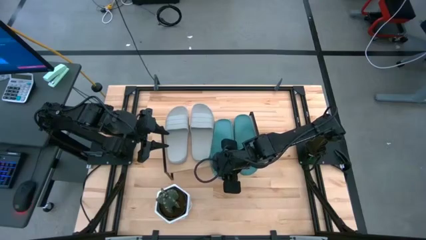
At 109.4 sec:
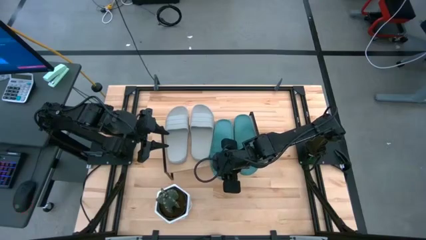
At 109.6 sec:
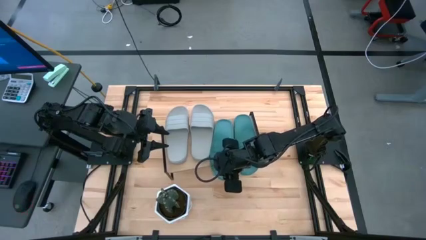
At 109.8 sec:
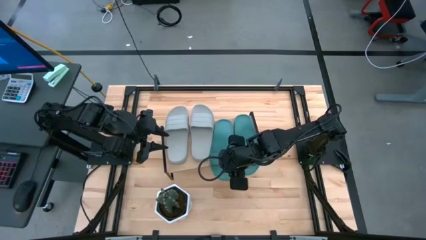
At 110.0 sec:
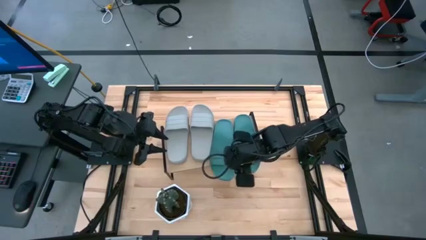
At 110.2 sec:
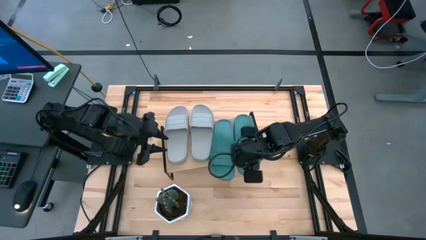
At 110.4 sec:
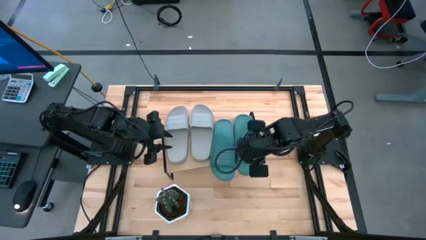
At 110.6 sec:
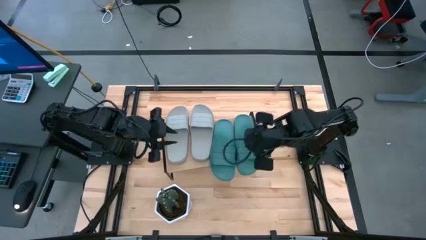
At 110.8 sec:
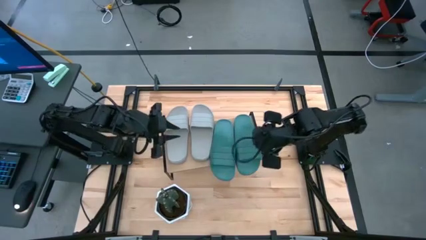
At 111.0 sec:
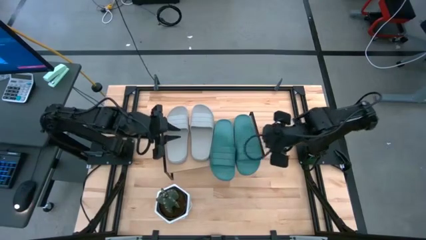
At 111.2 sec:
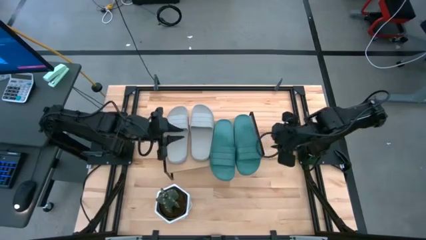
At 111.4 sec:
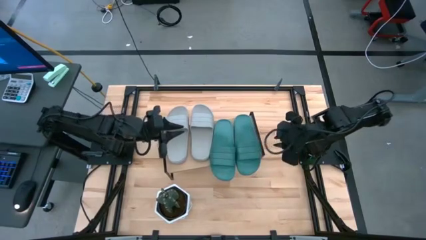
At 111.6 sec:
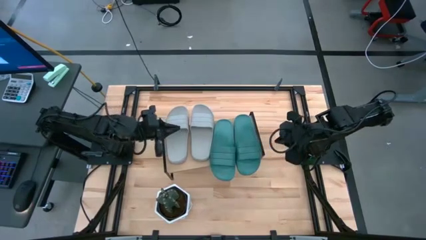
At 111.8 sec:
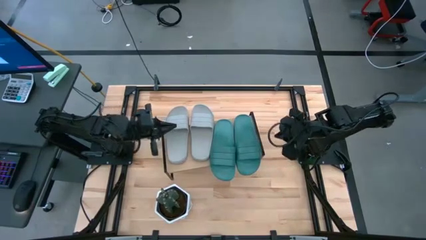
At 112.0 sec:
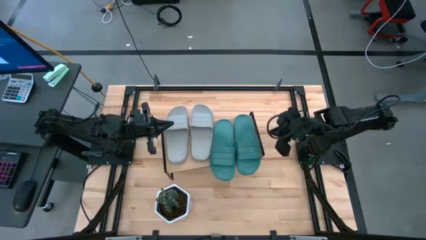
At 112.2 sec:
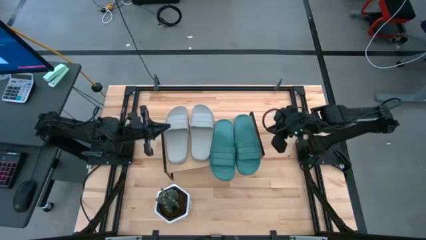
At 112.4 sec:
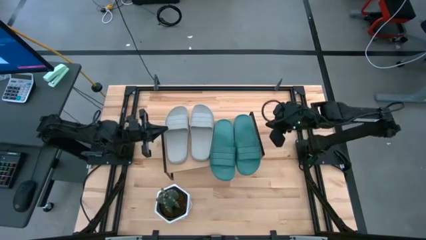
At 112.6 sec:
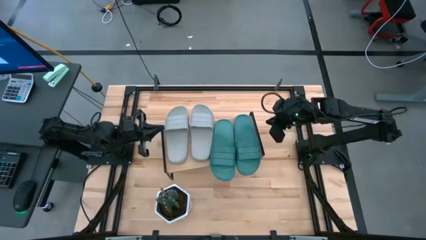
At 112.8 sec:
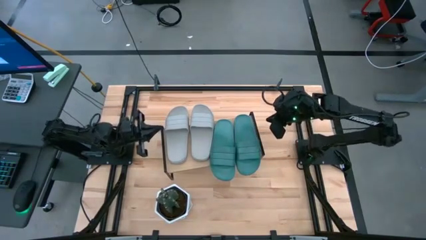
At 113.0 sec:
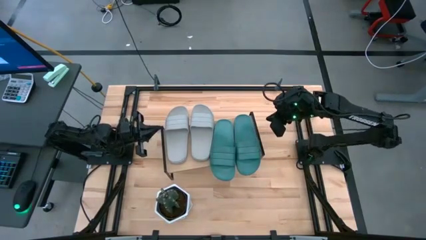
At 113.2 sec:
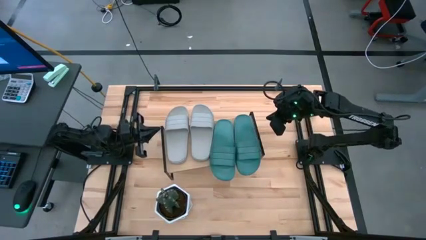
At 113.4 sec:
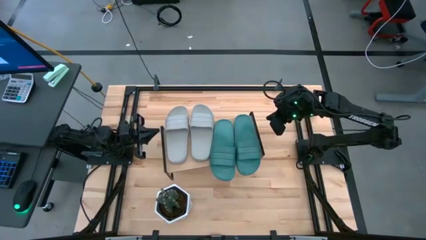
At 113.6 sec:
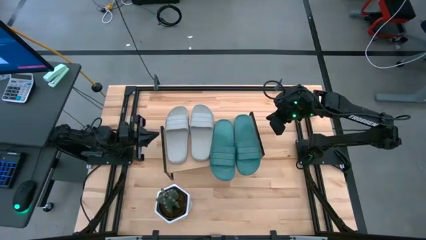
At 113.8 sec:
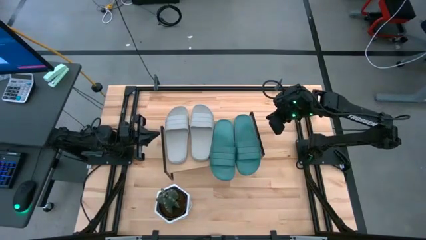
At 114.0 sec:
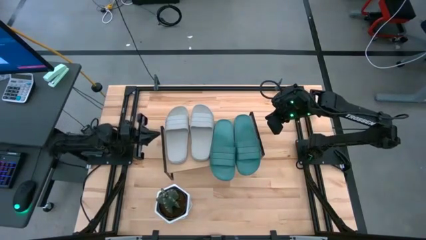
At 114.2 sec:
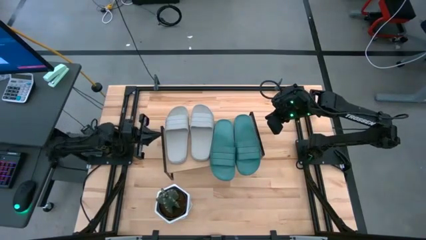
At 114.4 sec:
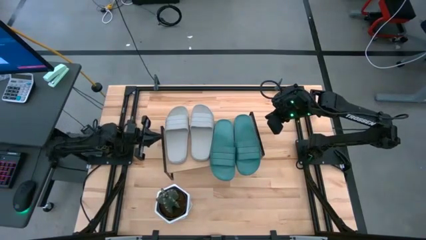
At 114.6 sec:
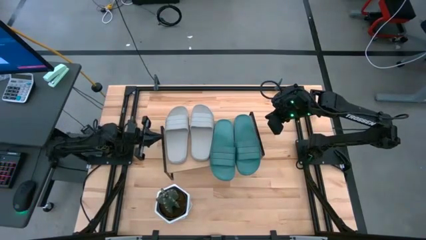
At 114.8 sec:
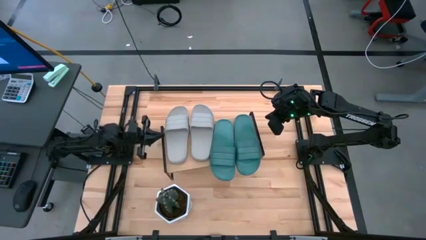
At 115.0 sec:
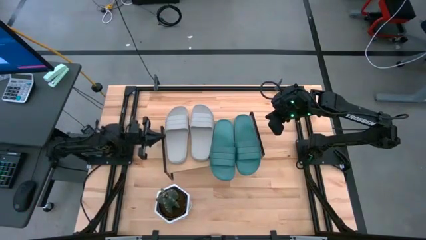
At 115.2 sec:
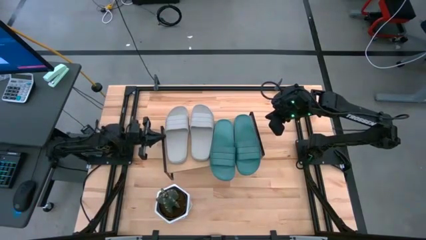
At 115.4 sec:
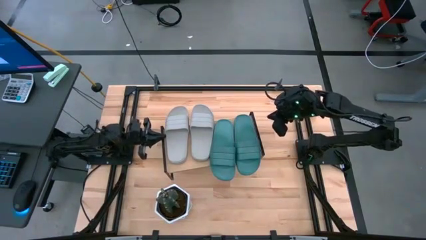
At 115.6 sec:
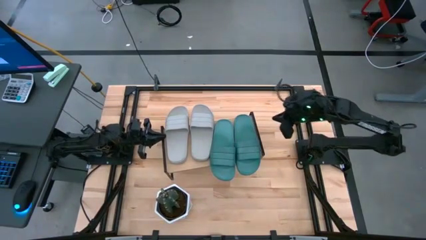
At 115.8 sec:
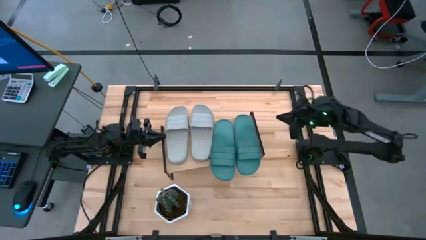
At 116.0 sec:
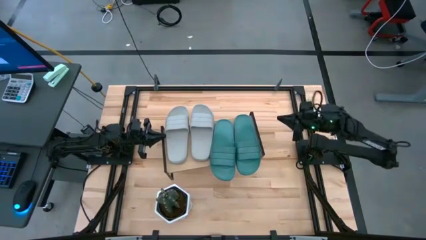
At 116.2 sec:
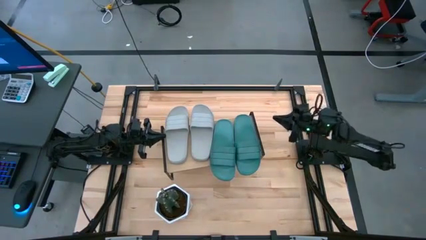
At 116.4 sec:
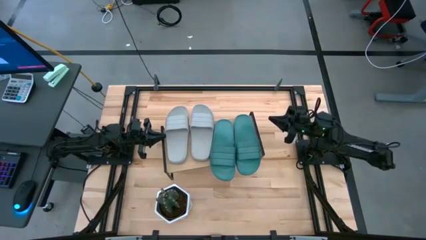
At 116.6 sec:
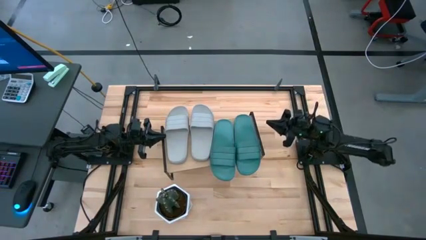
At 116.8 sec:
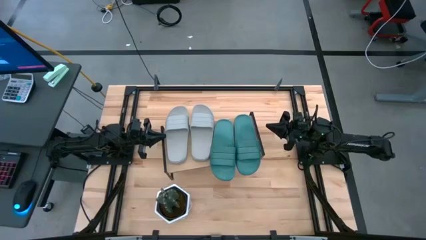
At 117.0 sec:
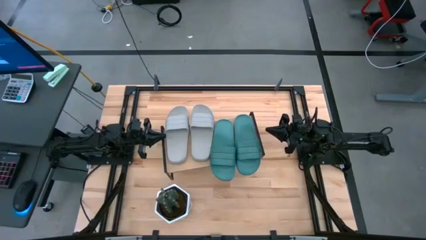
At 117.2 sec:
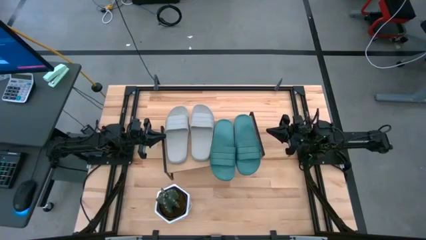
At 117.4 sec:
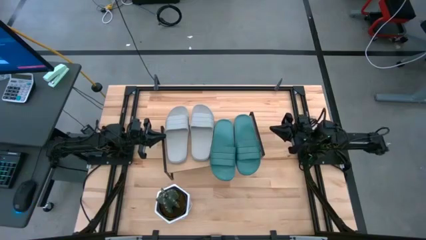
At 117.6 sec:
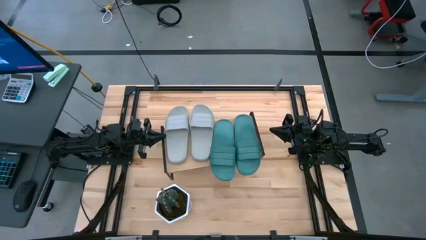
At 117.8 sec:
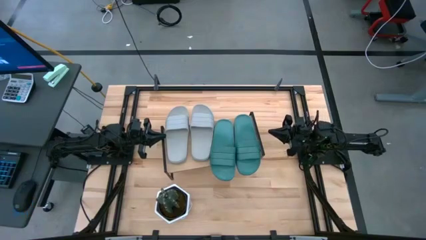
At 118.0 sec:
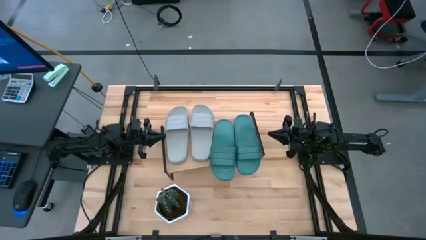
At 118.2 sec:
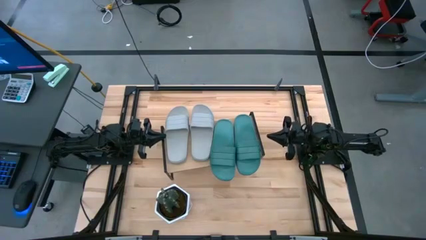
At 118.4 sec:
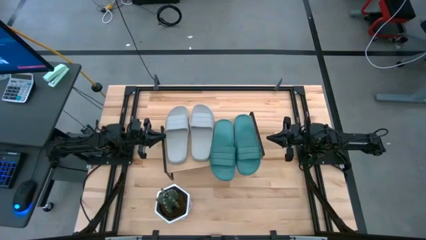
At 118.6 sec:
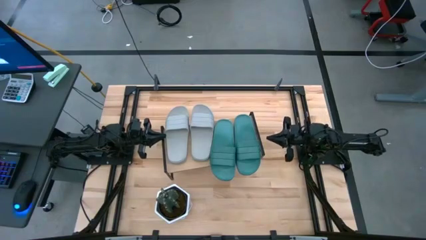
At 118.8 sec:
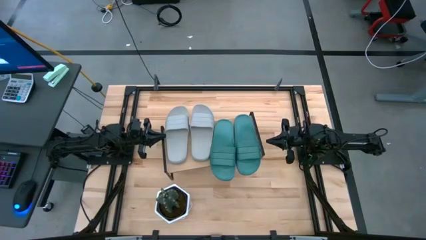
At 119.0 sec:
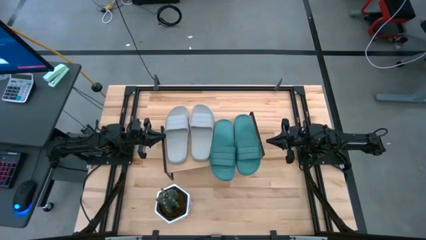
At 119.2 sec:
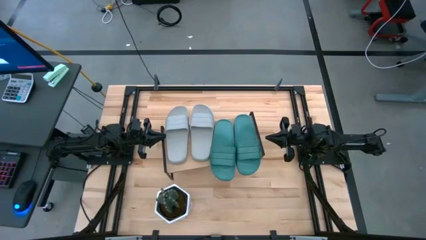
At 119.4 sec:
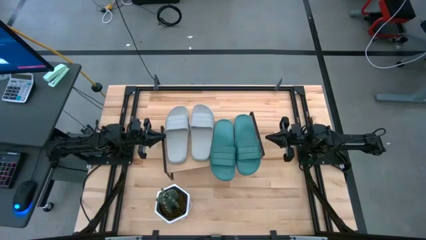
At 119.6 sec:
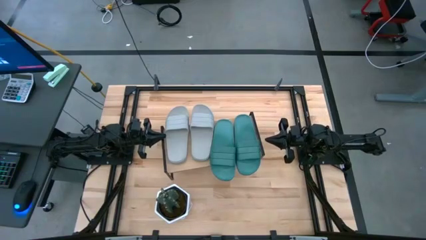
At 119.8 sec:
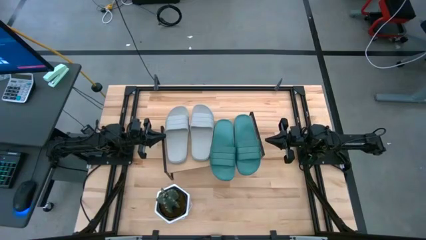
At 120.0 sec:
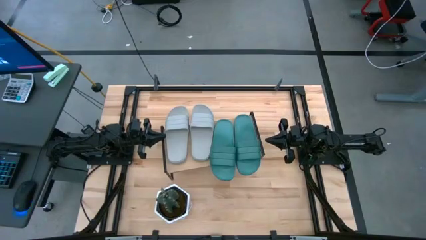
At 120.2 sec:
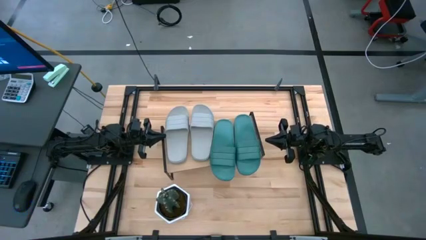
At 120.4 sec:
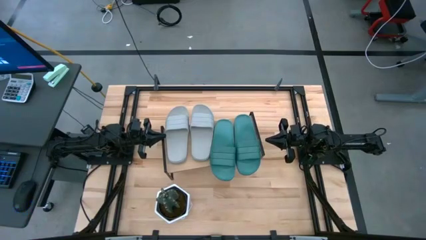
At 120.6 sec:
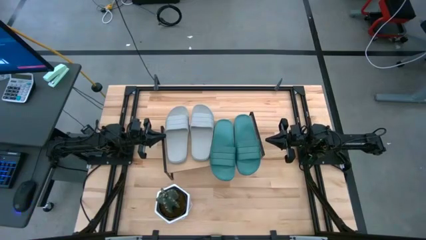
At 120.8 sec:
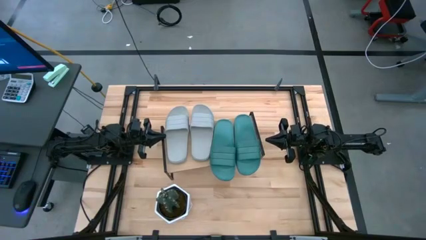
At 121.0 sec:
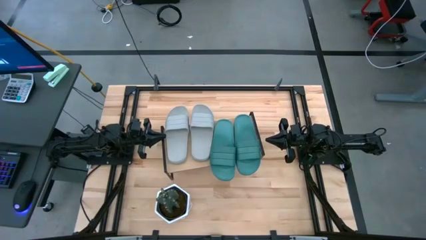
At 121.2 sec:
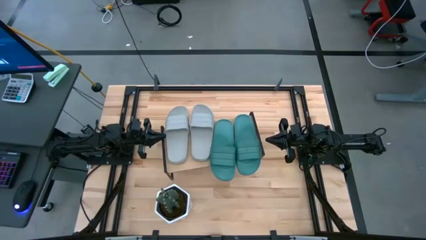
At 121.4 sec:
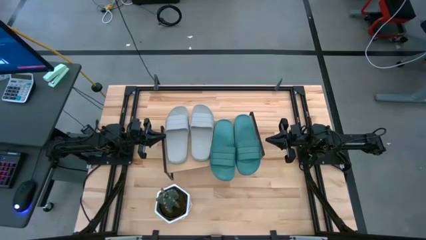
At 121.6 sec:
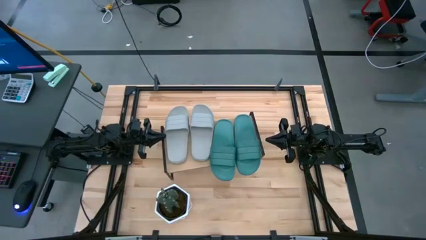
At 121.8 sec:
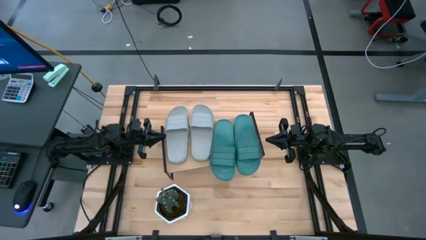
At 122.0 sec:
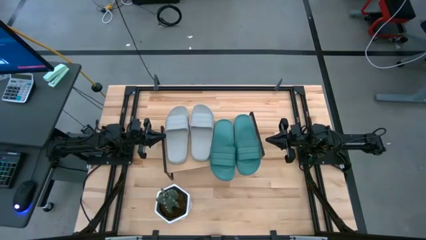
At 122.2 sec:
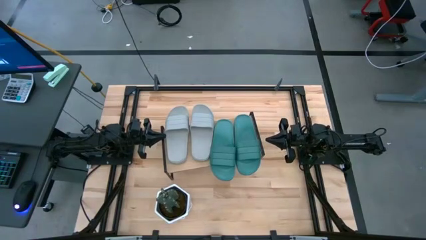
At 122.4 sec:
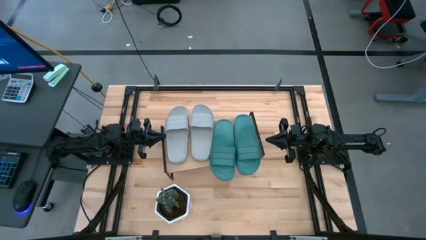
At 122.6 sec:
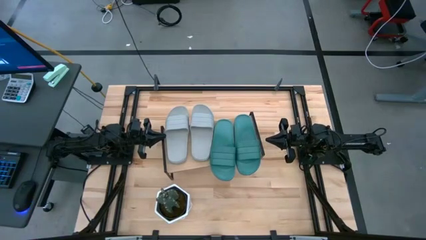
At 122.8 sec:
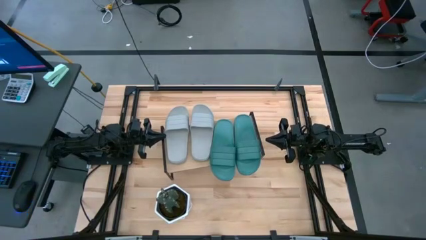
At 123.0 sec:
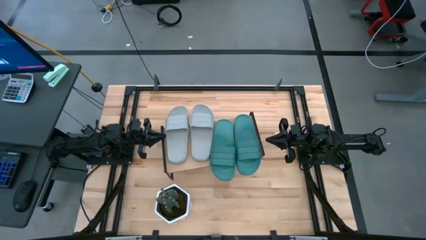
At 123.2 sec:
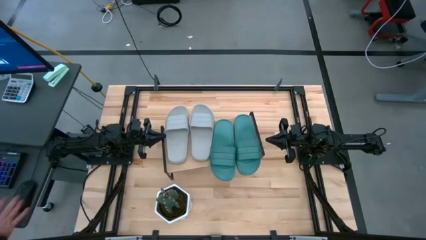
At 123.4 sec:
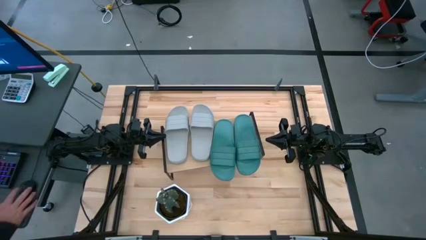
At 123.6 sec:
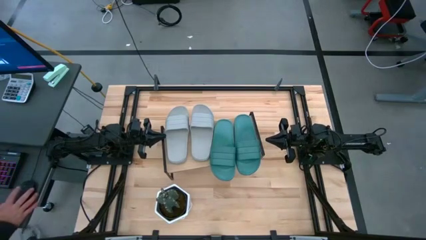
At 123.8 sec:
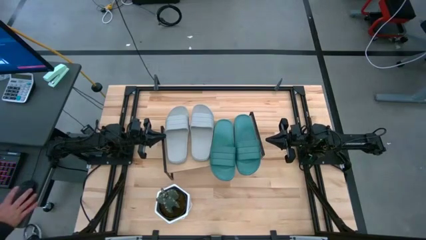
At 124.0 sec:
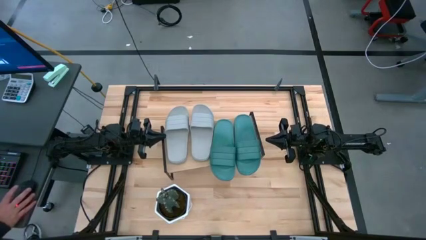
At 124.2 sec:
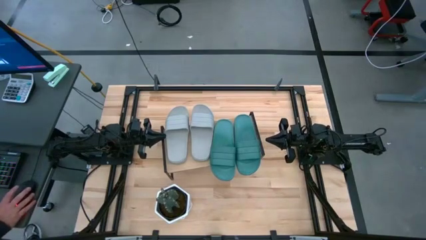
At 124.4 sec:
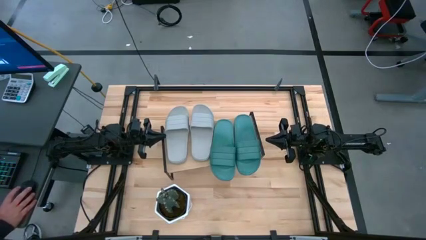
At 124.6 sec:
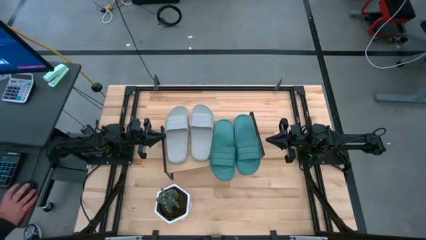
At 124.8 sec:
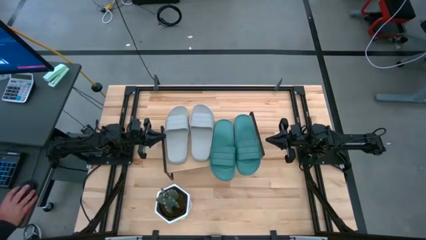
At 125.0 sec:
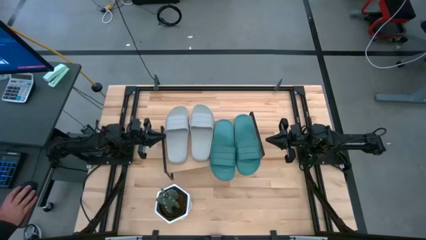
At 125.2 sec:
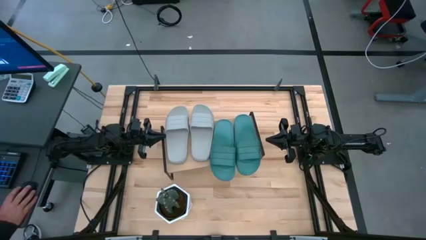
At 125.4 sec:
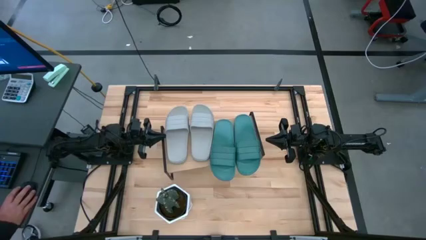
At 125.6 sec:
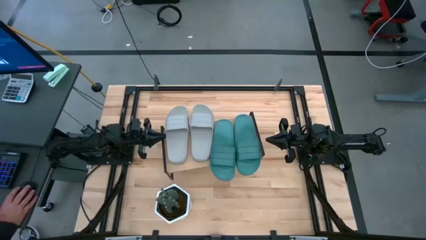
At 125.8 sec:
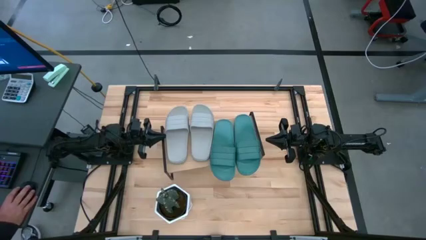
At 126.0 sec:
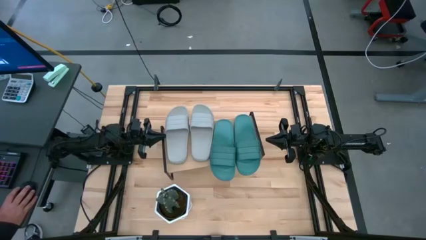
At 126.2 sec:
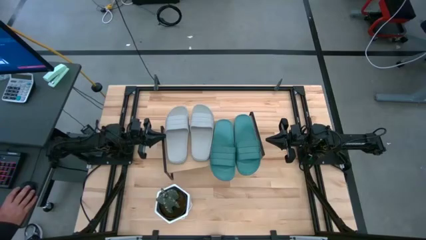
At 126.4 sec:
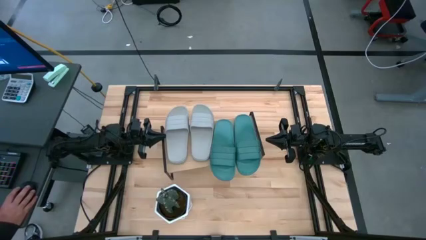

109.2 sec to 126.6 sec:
Task: Pick and place slides into the shelf
Return to Home Position
